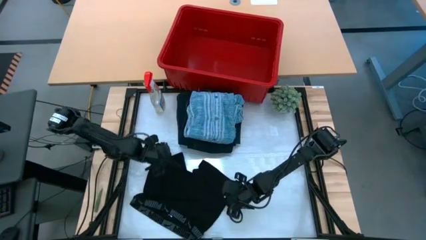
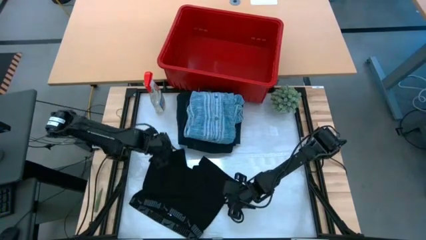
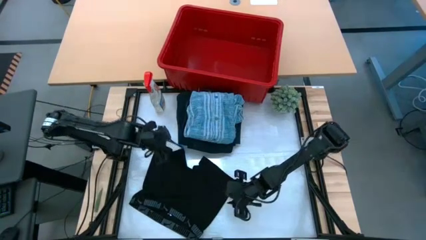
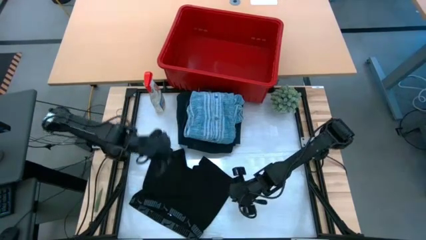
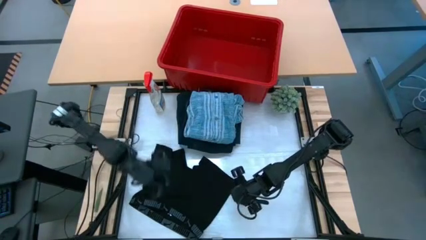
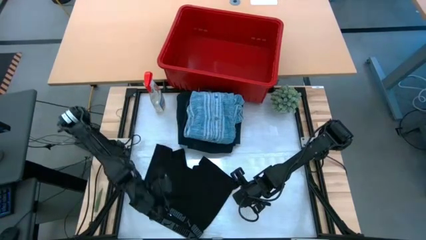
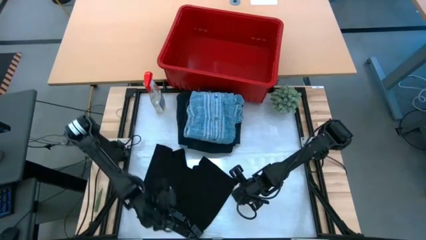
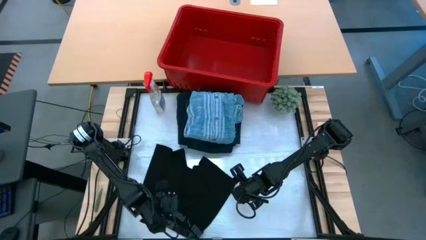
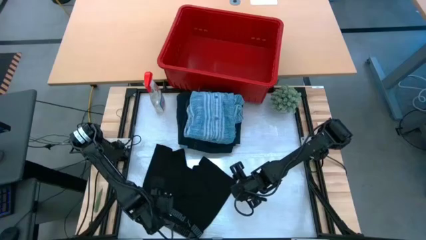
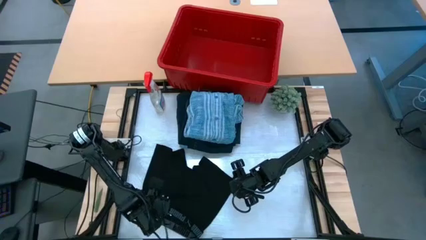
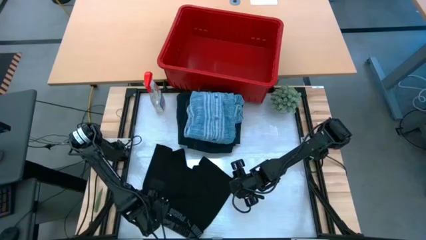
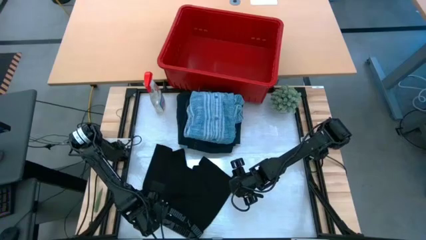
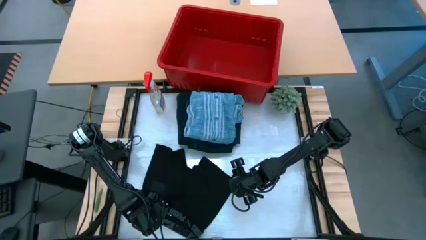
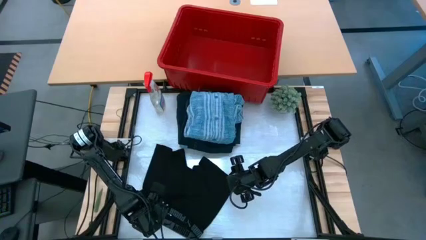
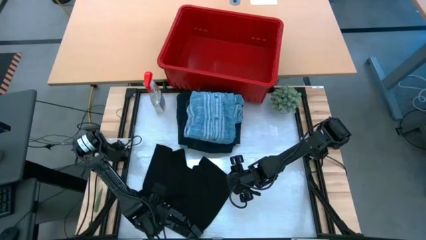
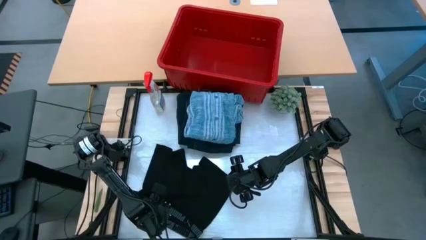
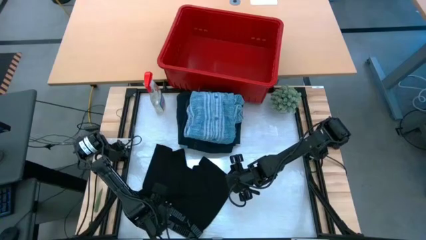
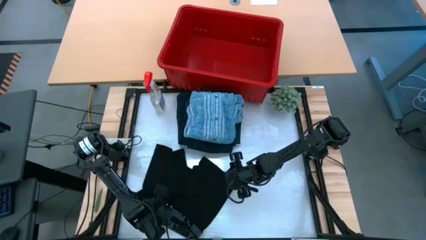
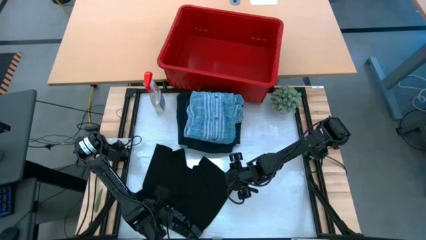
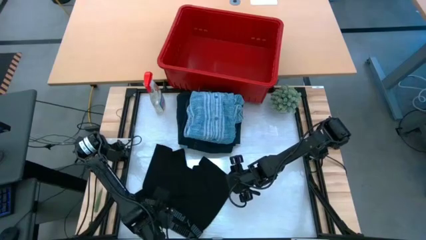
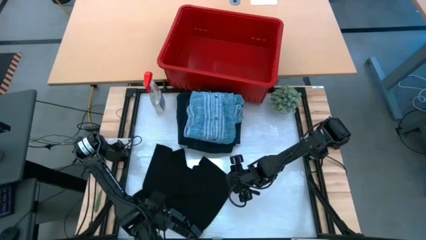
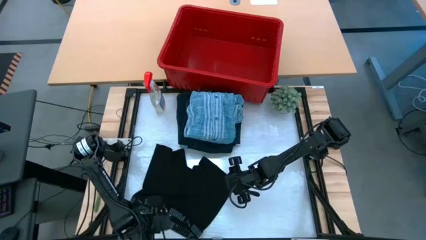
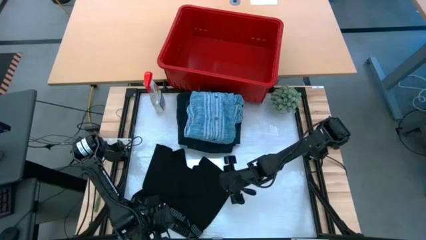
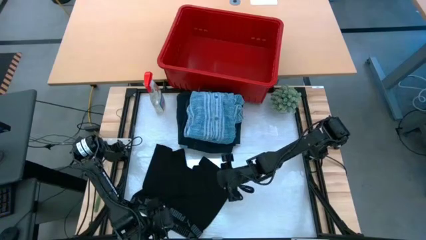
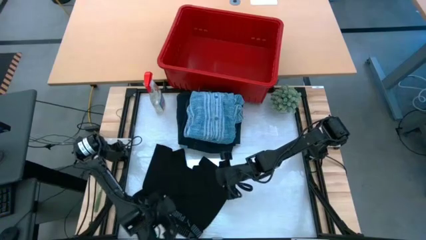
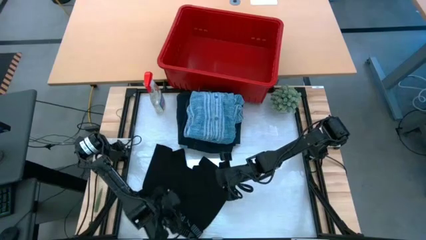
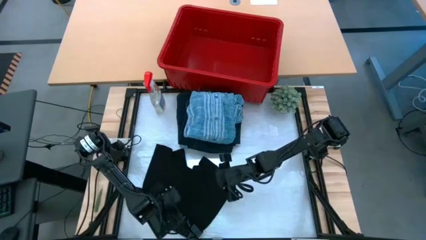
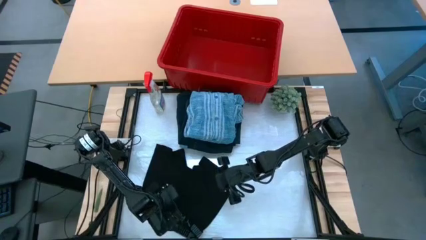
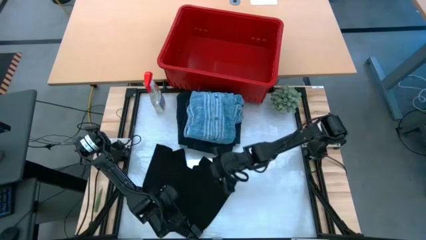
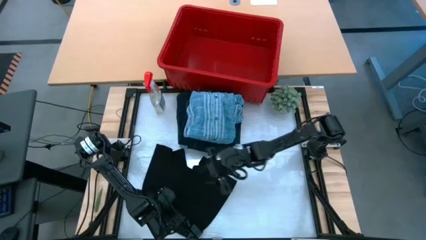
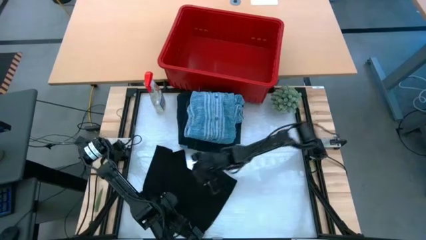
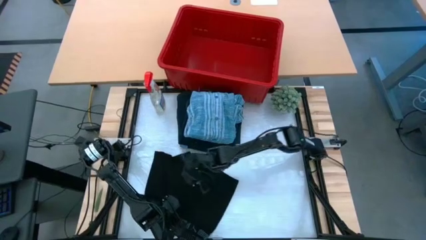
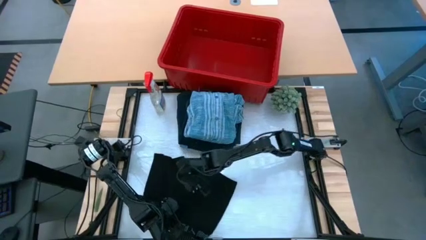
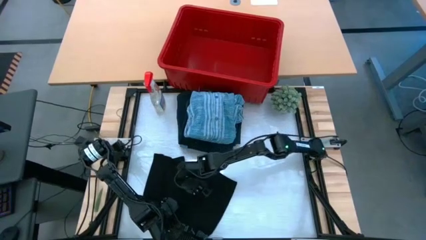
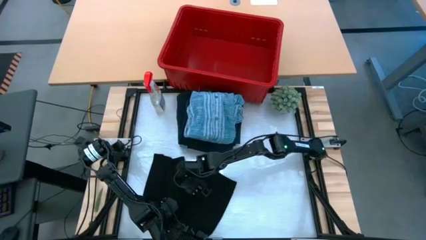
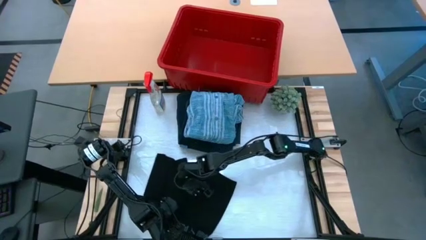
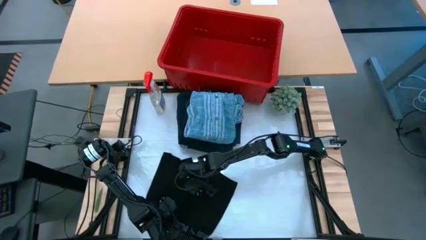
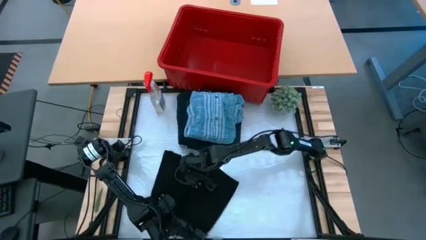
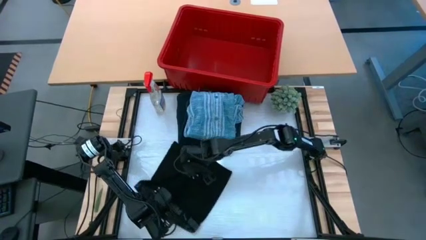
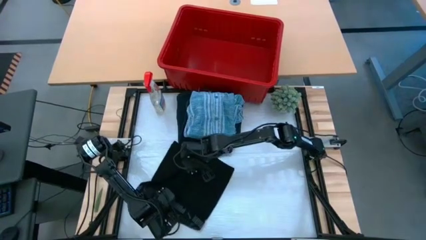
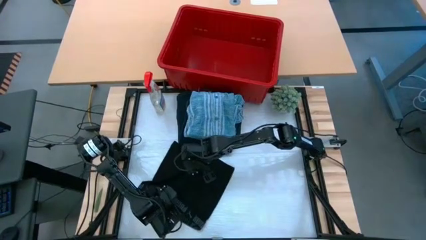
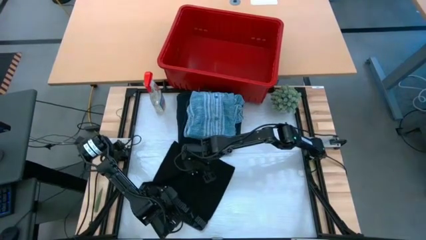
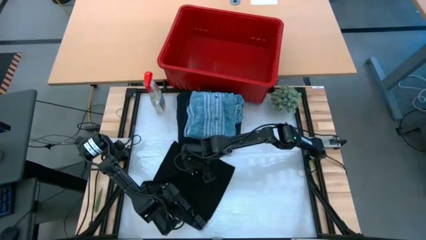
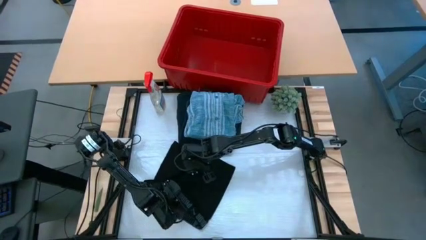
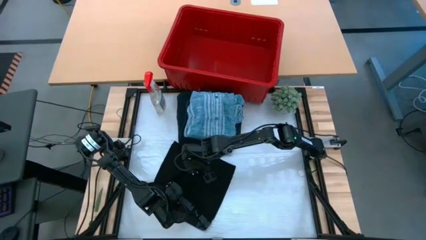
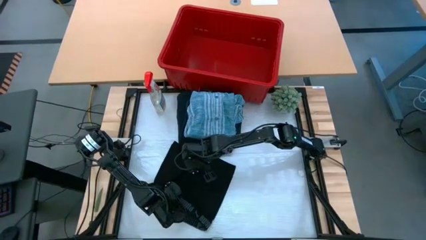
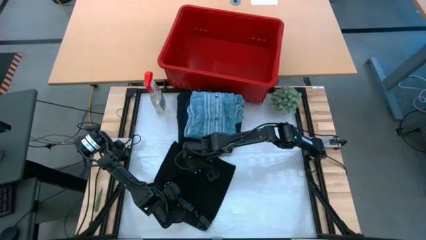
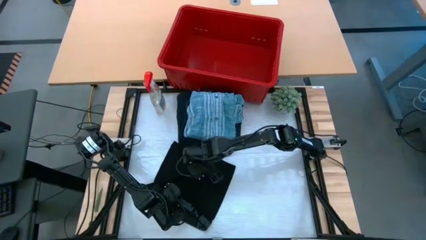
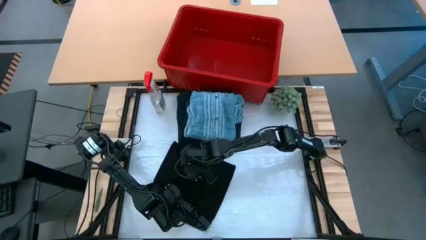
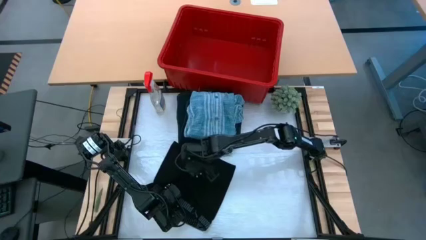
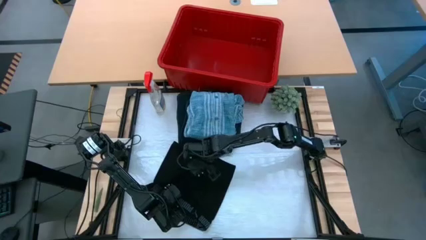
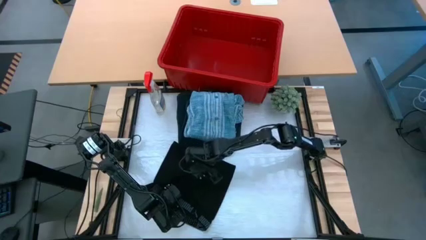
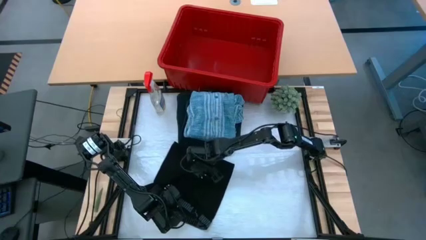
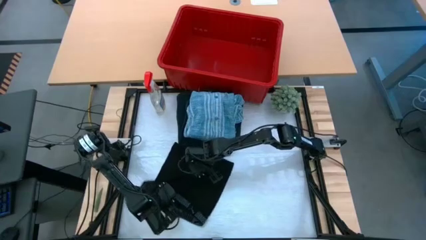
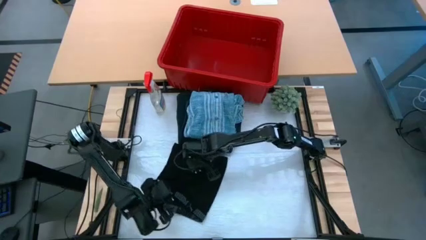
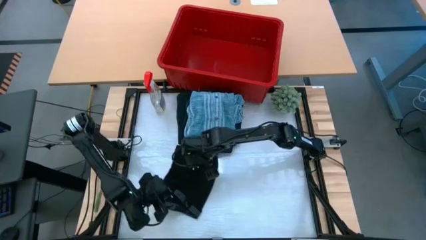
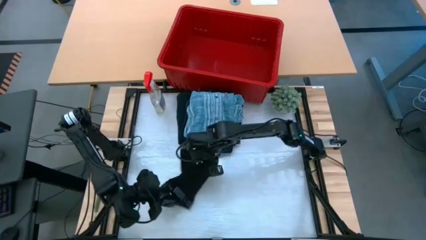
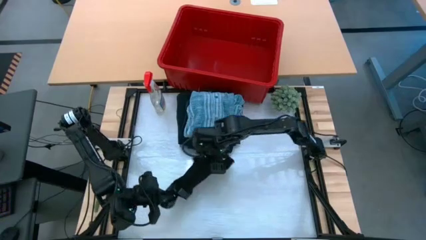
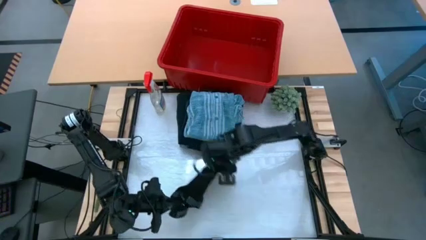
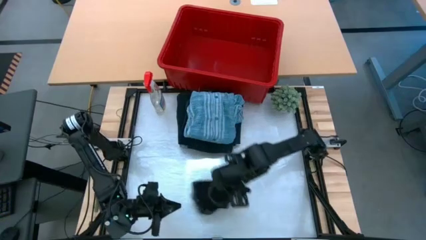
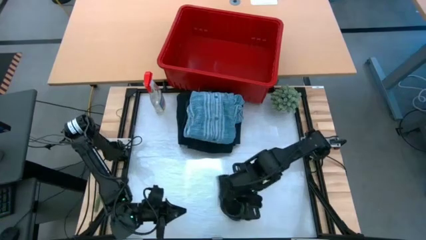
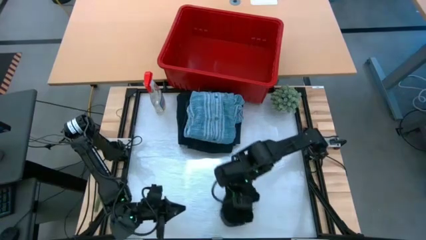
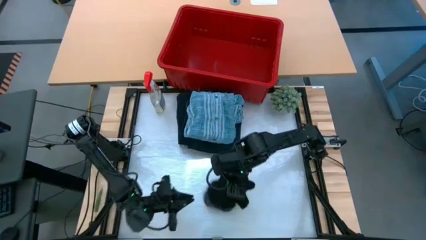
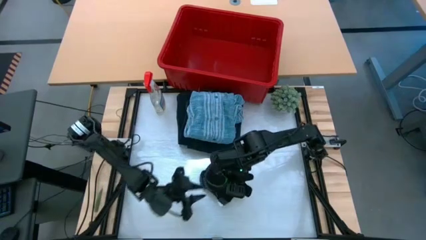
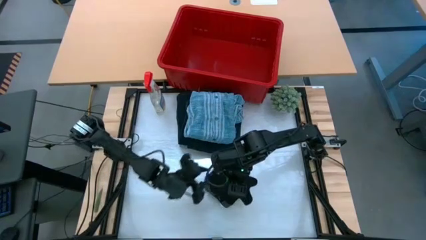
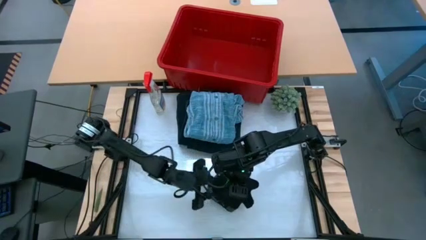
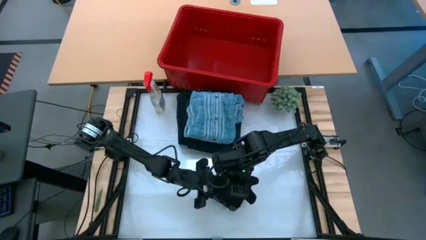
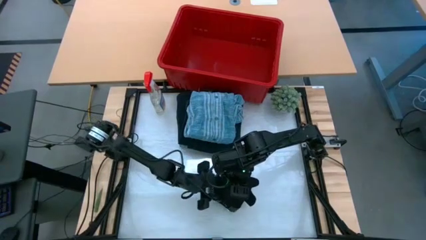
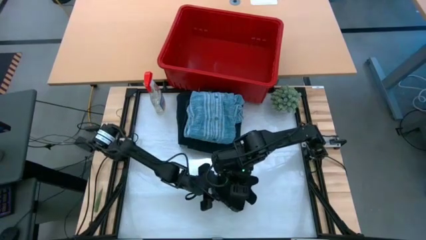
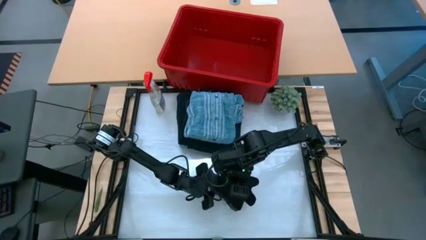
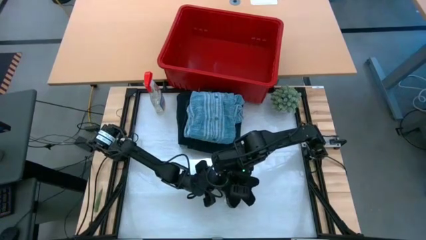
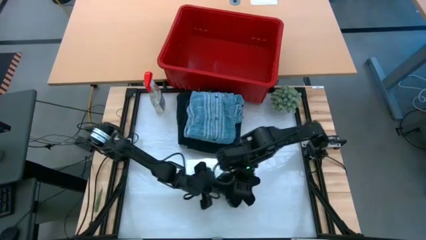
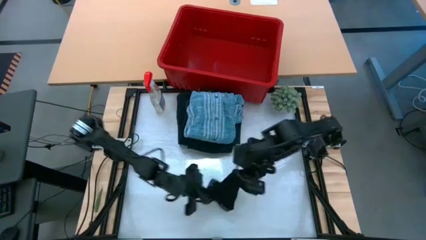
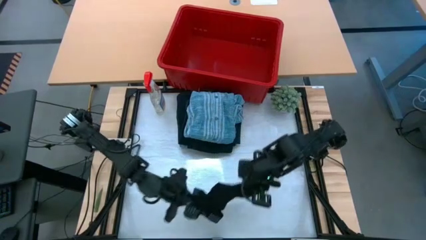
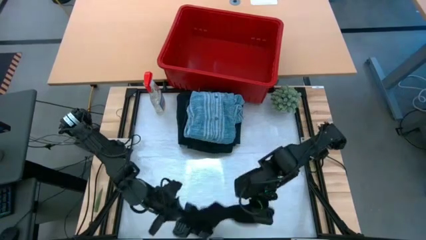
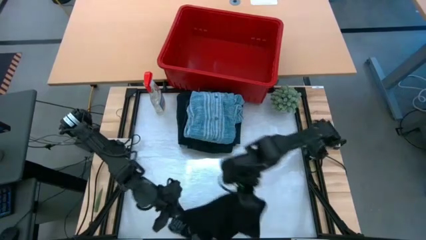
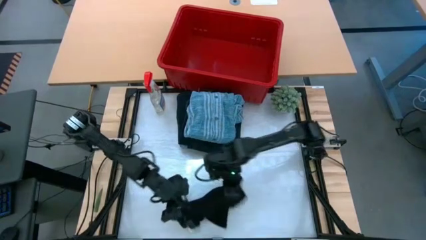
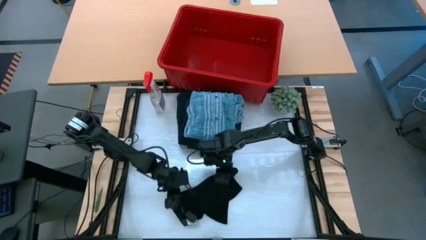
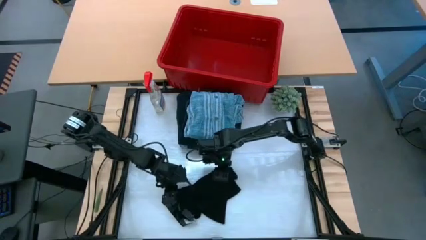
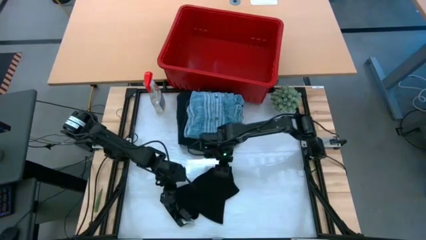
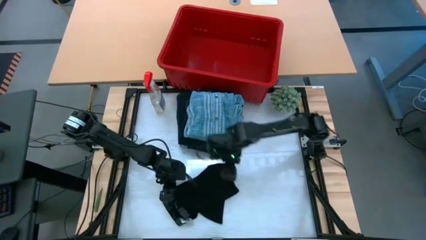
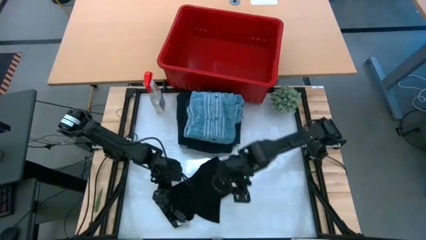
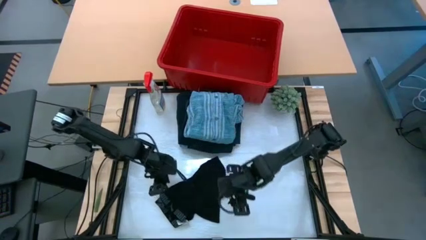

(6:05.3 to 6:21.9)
Task: Fold Laundry from Bin
Fold the black underwear from the red laundry
